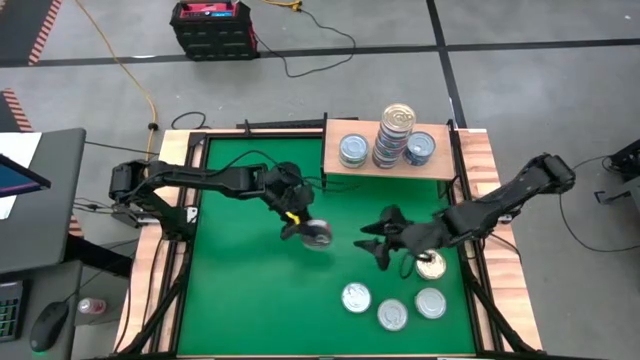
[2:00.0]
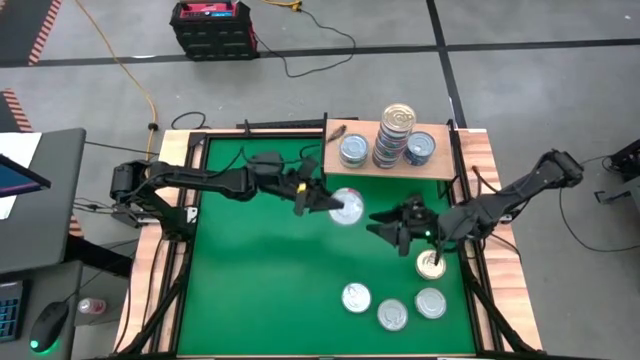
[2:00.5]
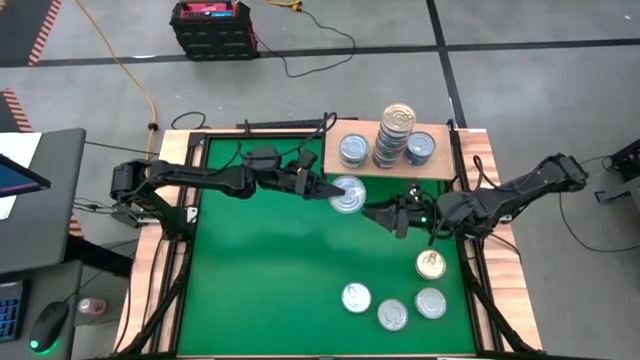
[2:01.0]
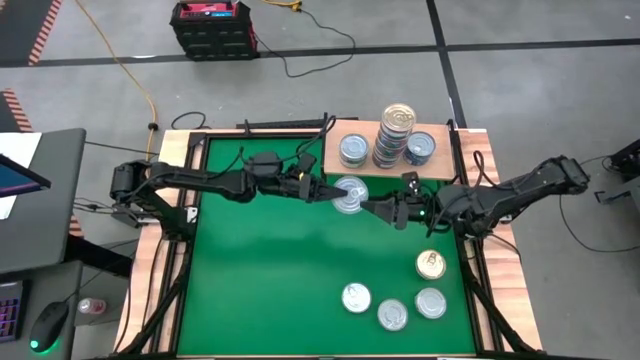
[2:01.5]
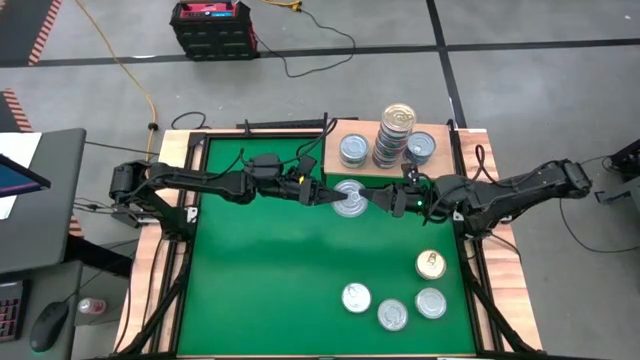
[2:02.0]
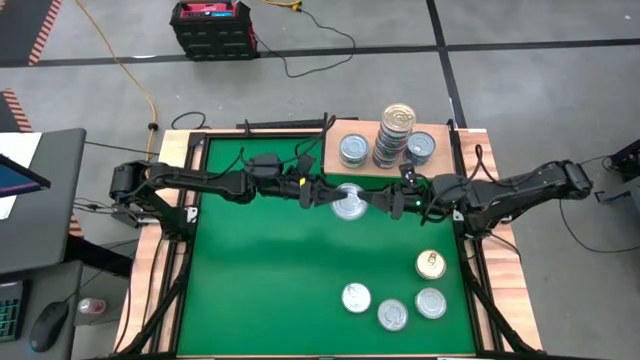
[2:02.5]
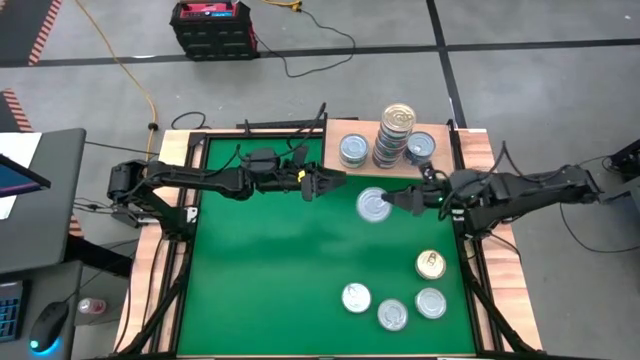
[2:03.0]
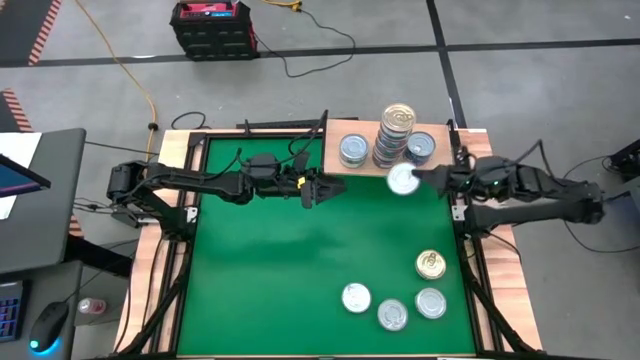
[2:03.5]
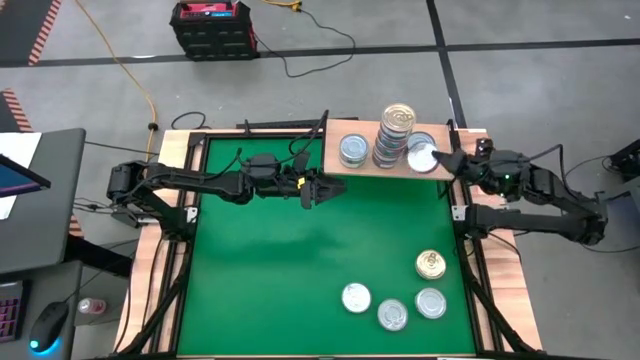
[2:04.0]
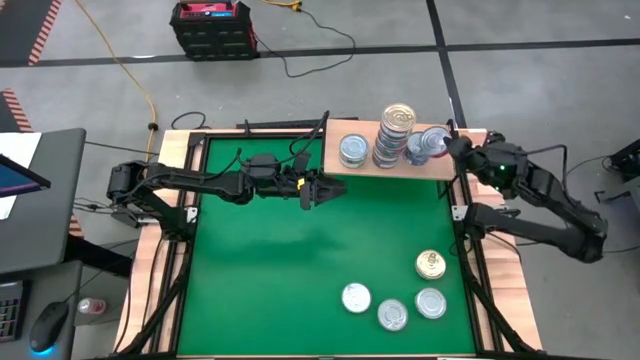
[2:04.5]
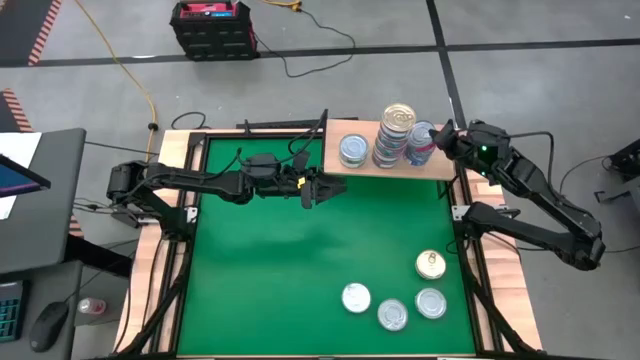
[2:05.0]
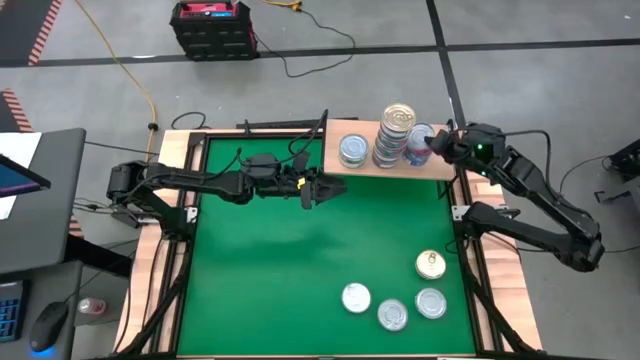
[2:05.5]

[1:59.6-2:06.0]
Task: Stack canned seafood by type on shelf
Stack the red tuna can on top of the blue tuna can

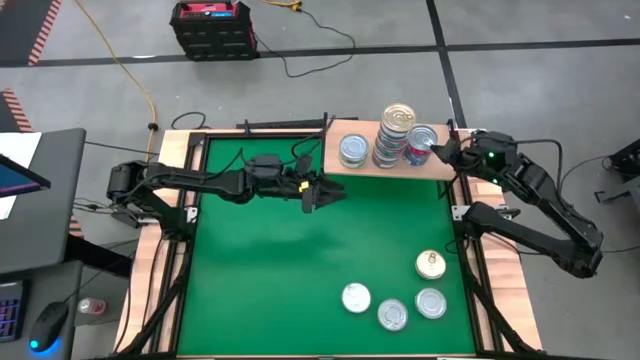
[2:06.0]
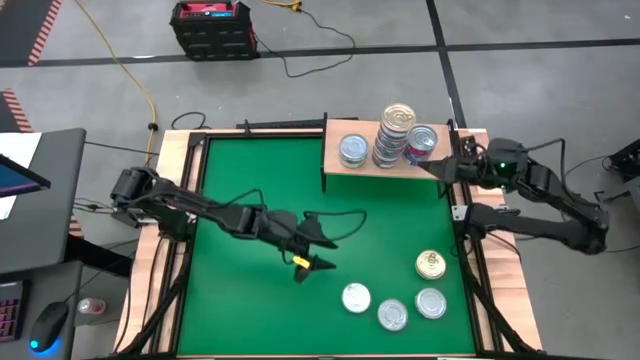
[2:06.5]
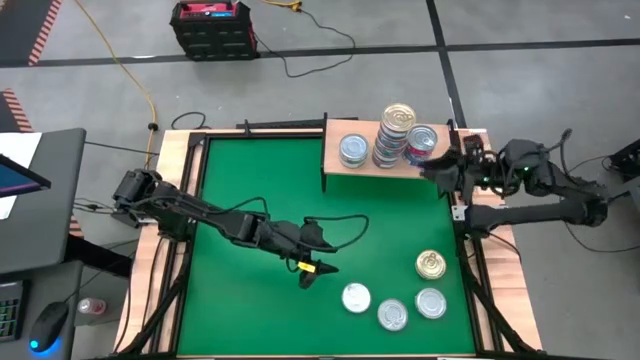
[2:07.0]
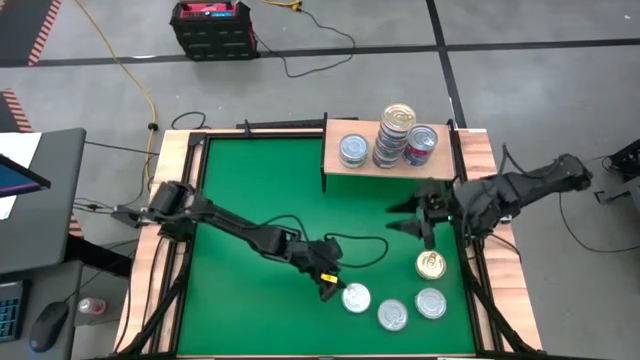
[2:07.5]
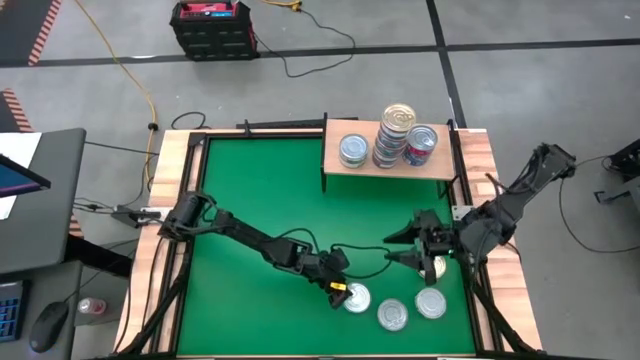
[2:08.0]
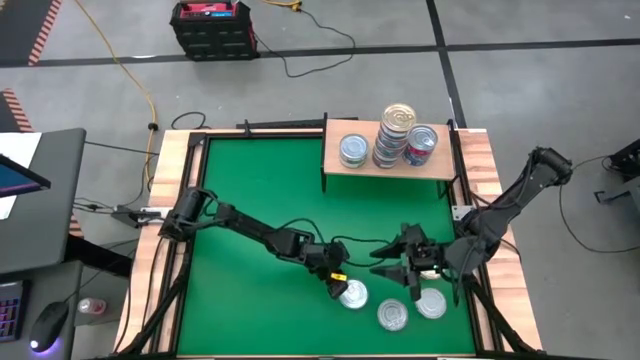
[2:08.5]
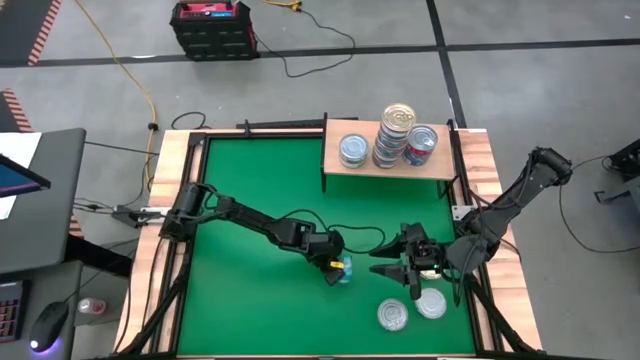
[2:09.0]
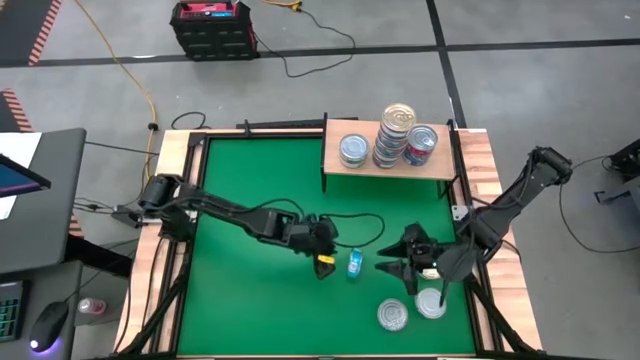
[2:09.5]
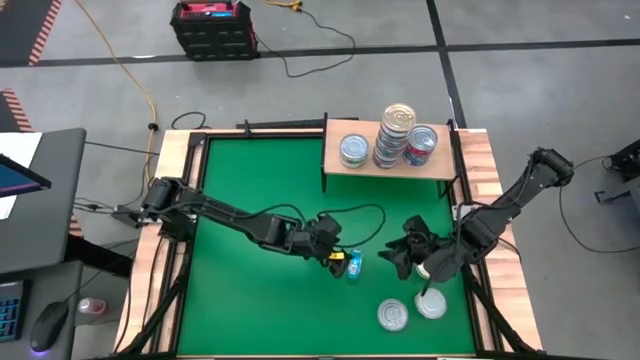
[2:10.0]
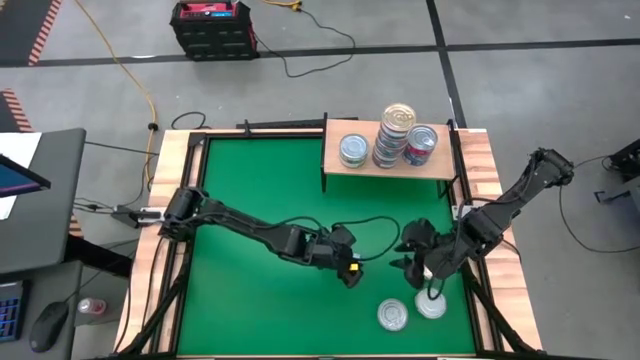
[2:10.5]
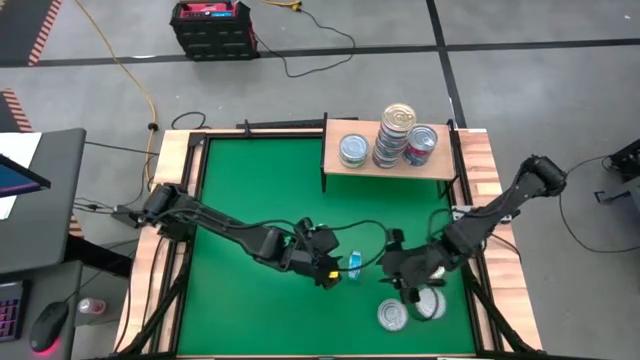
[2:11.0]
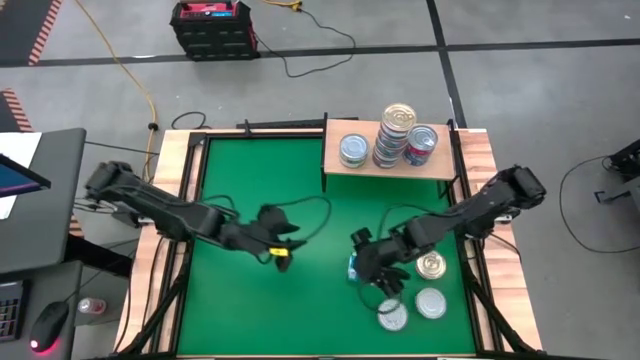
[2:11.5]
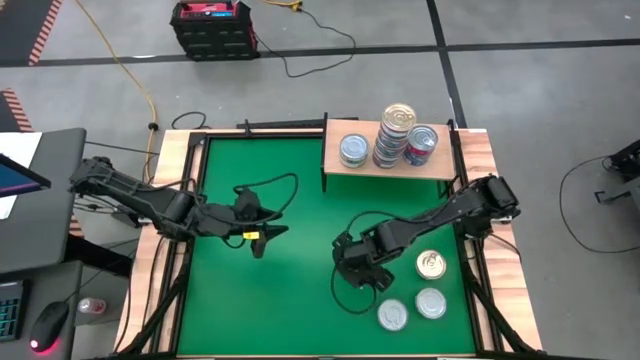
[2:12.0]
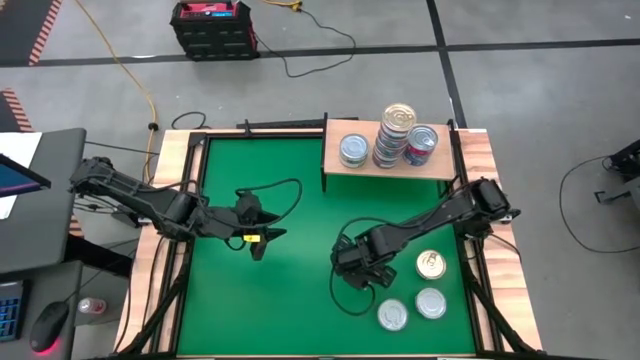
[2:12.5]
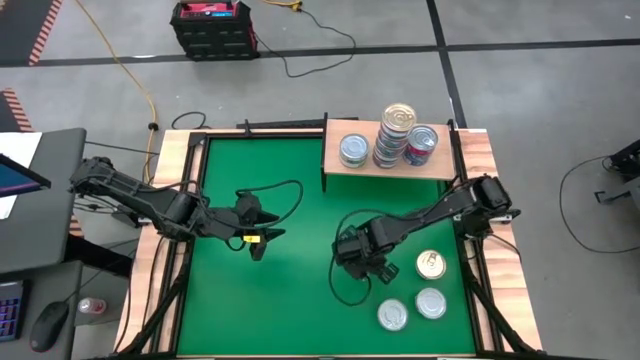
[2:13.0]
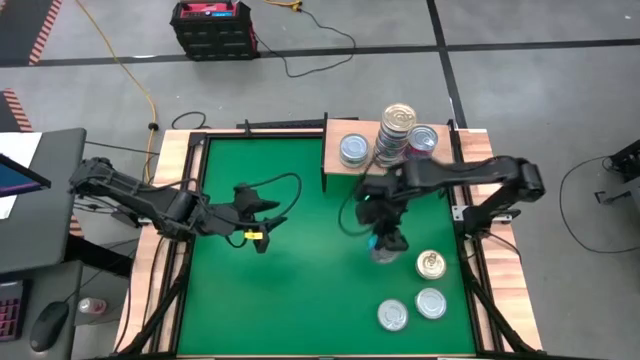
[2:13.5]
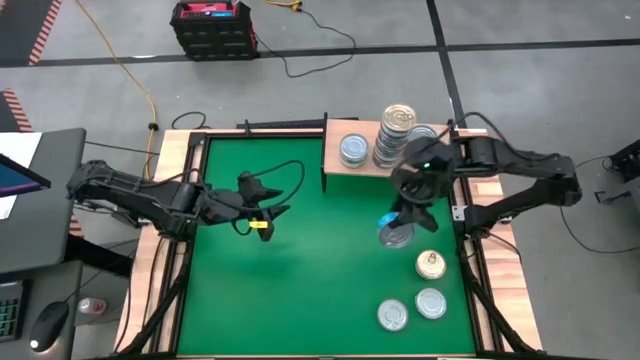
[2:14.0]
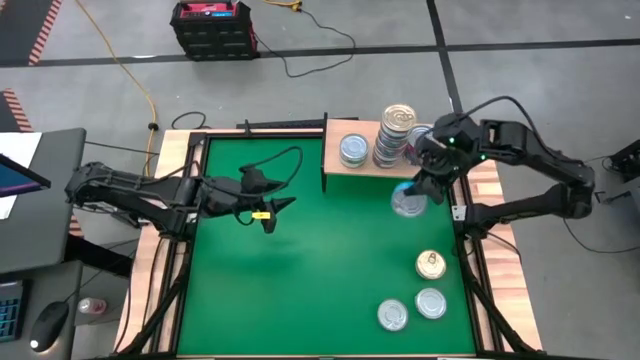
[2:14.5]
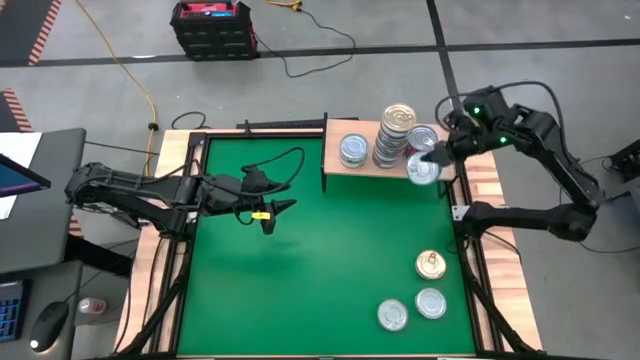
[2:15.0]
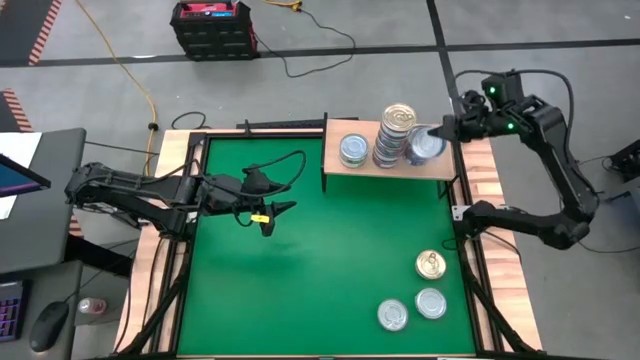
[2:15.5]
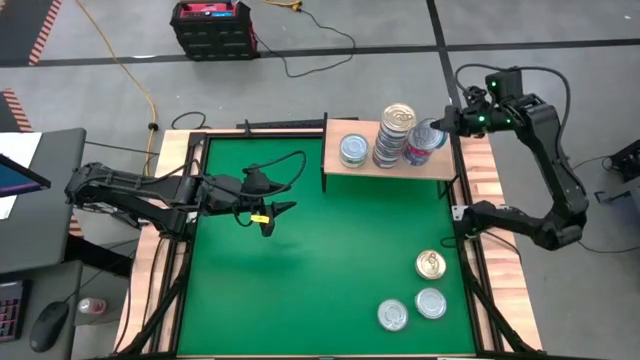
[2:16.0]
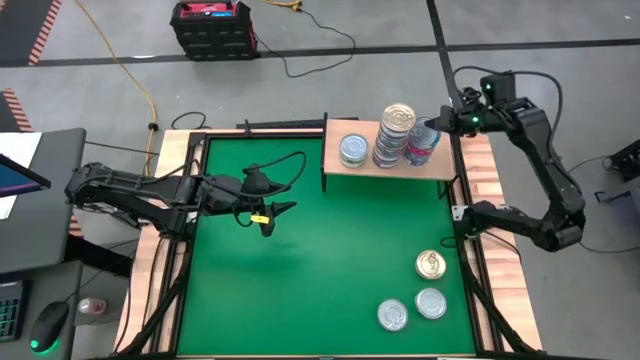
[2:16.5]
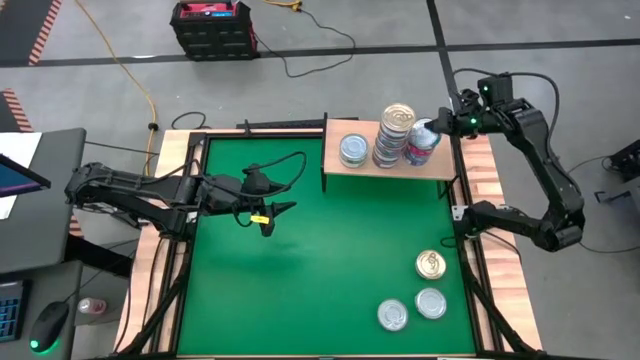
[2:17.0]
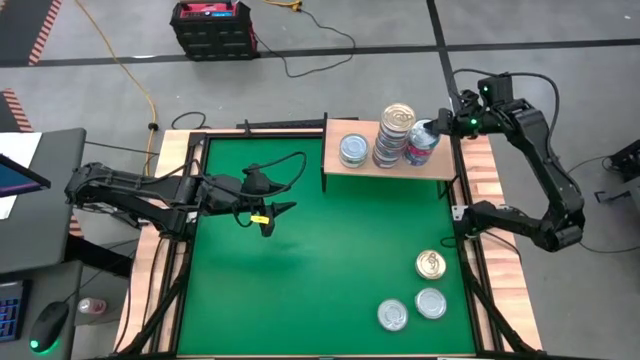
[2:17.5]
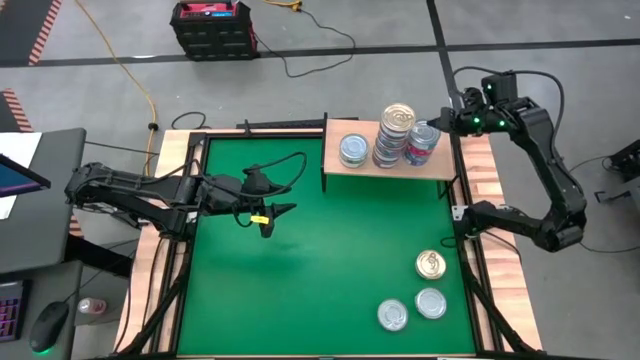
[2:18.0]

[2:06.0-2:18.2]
Stack the light blue tuna can on top of the colored tuna cans

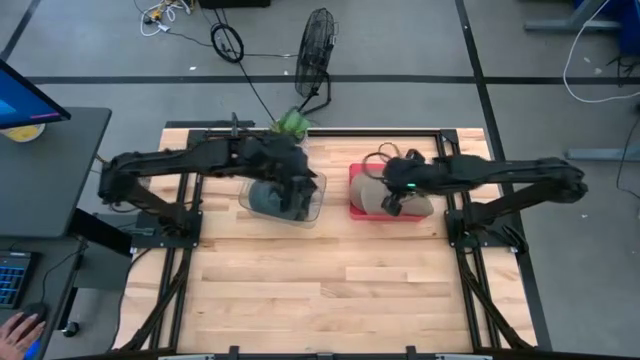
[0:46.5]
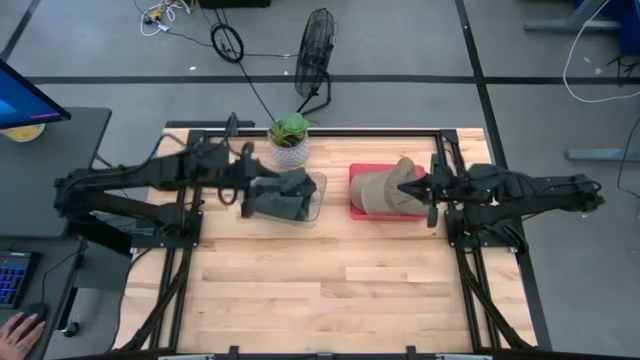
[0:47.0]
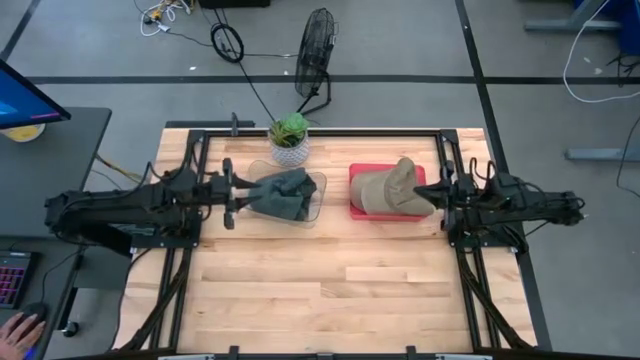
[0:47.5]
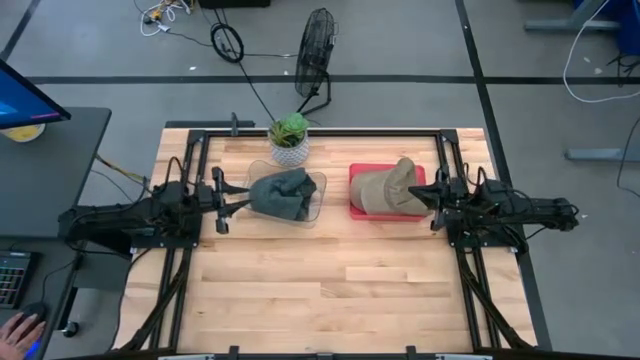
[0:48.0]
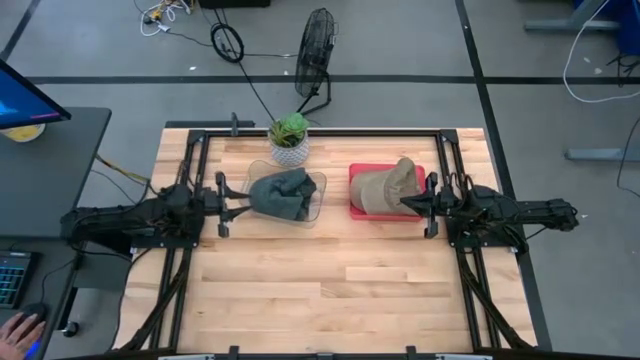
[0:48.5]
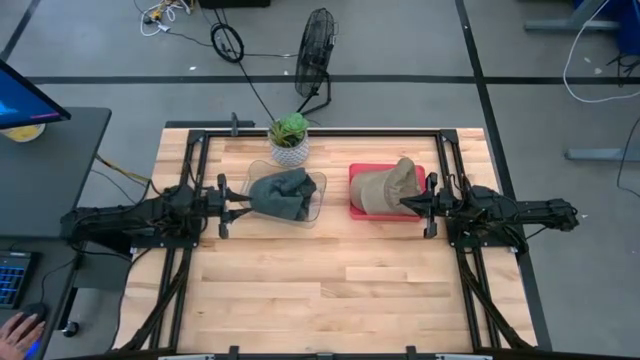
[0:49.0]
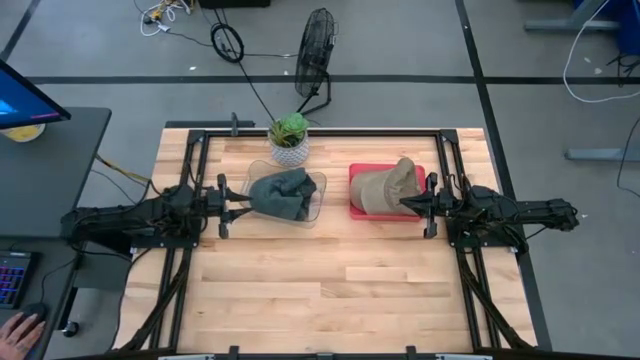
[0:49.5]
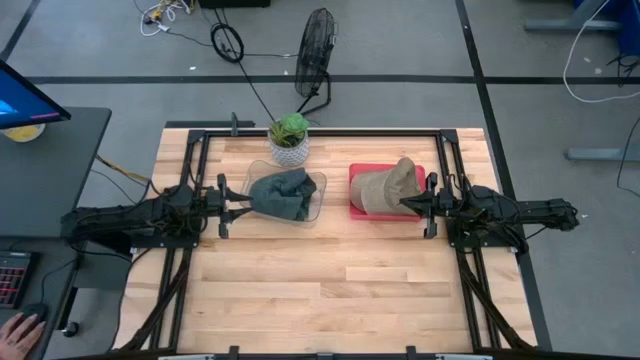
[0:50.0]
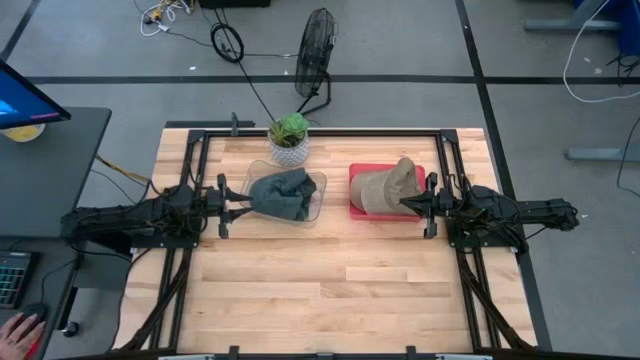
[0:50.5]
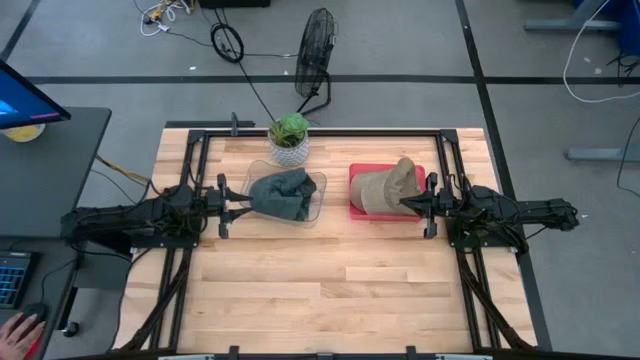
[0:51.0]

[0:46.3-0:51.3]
Task: Pick & Place hat
Return to Home Position
